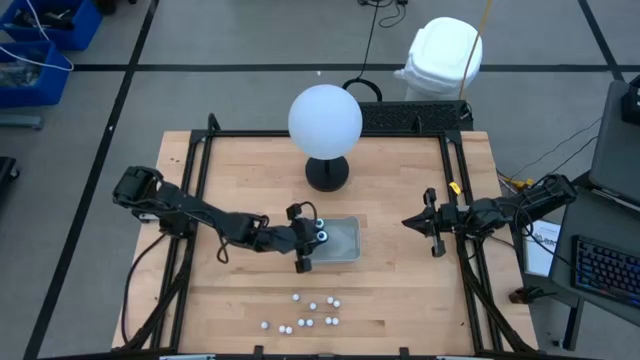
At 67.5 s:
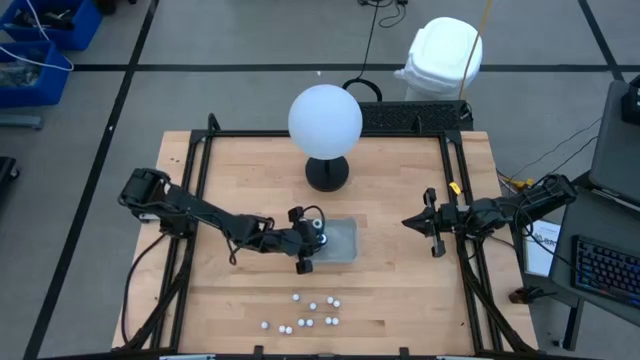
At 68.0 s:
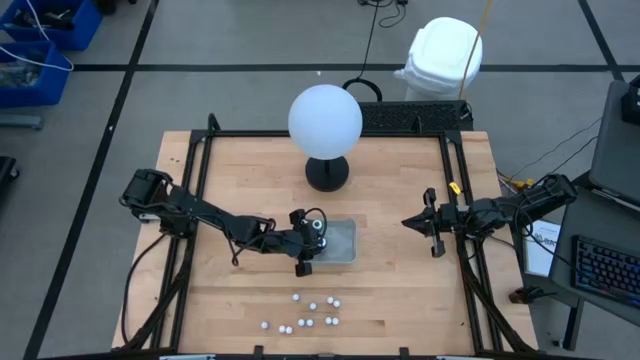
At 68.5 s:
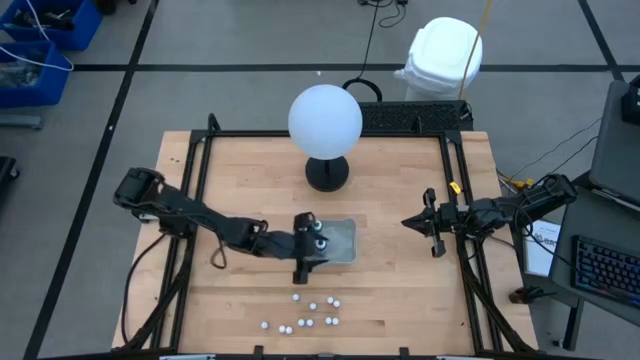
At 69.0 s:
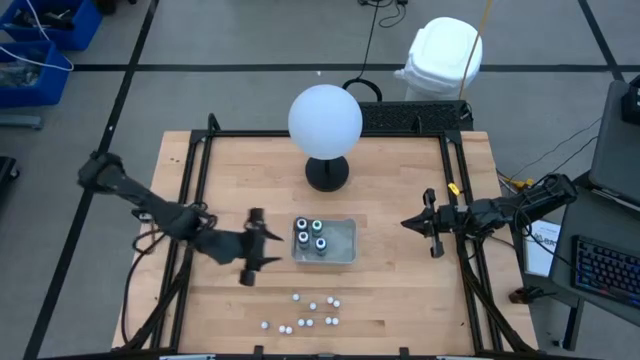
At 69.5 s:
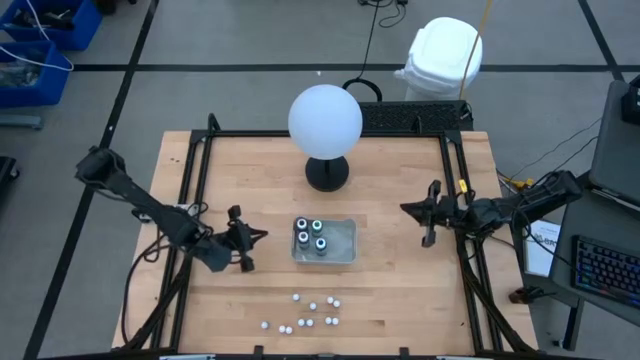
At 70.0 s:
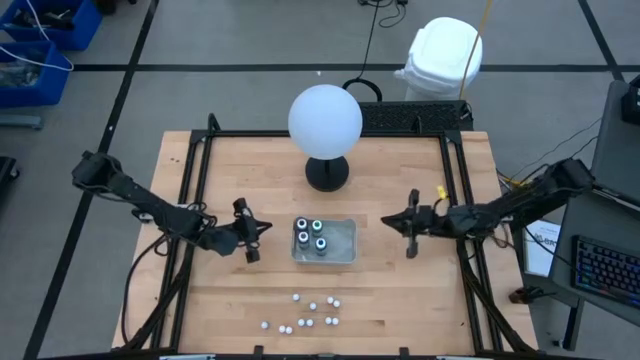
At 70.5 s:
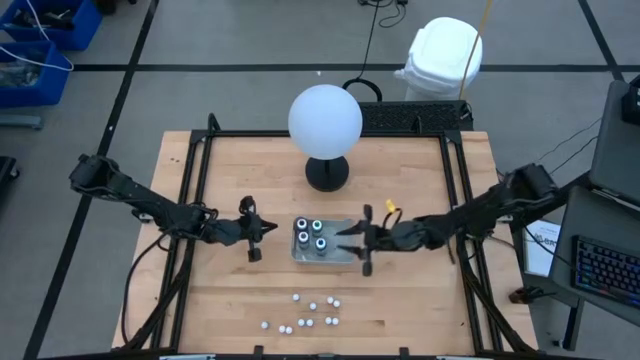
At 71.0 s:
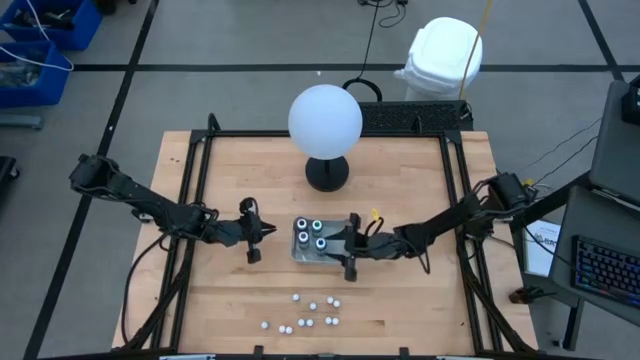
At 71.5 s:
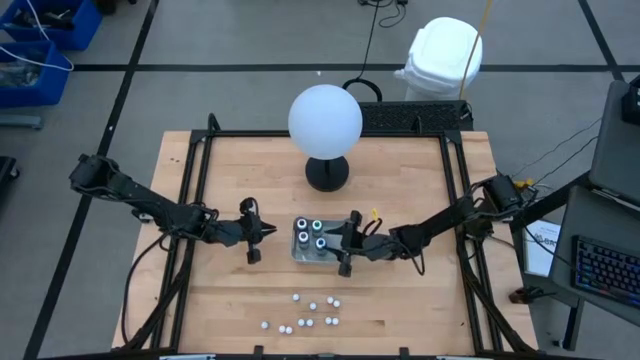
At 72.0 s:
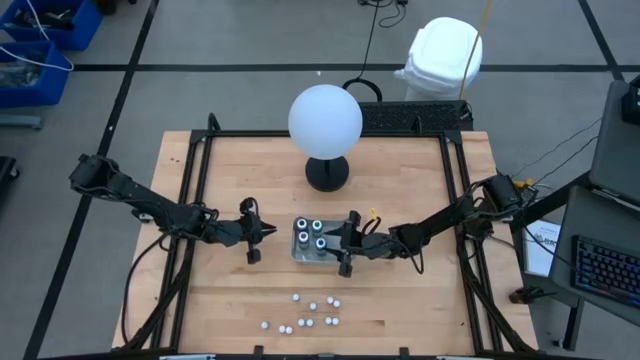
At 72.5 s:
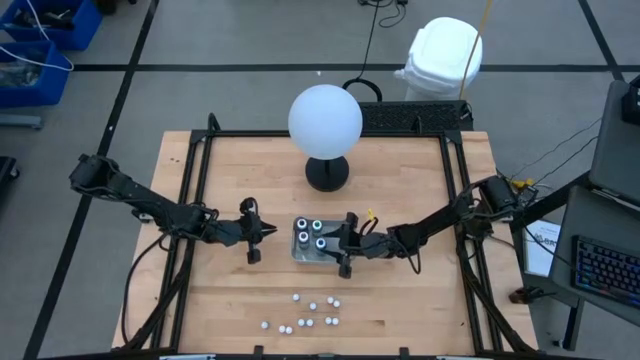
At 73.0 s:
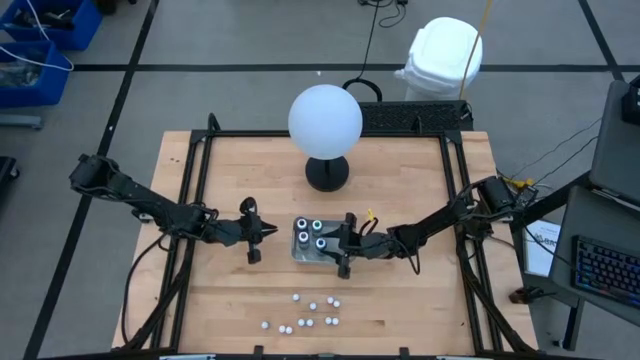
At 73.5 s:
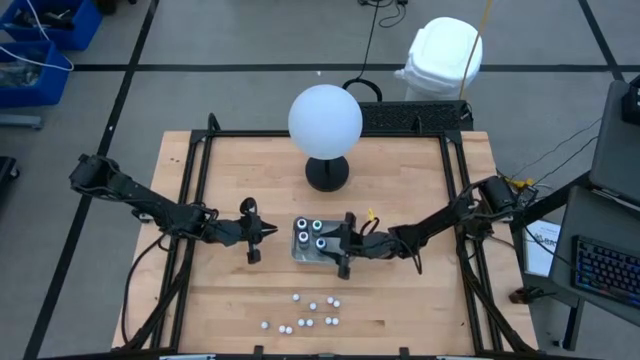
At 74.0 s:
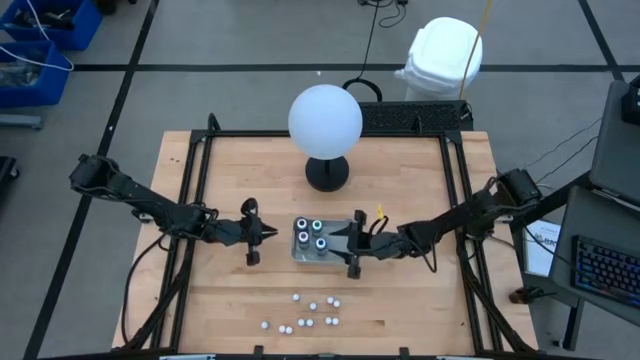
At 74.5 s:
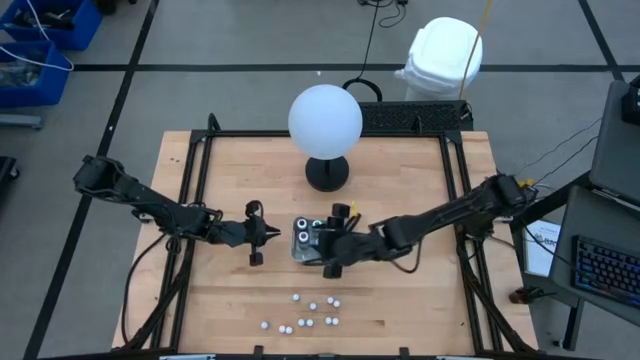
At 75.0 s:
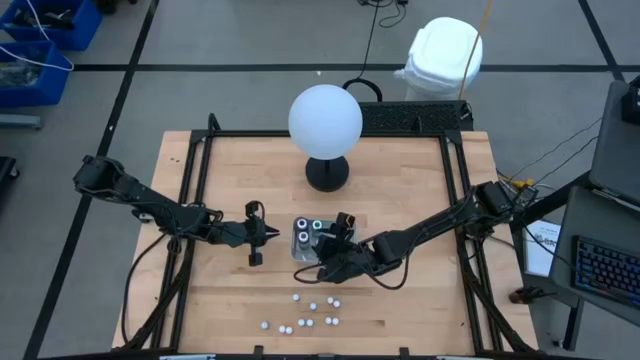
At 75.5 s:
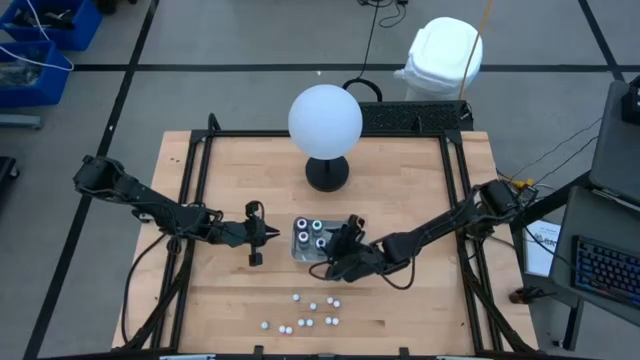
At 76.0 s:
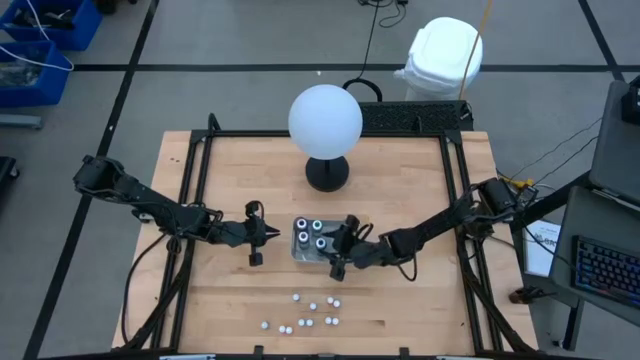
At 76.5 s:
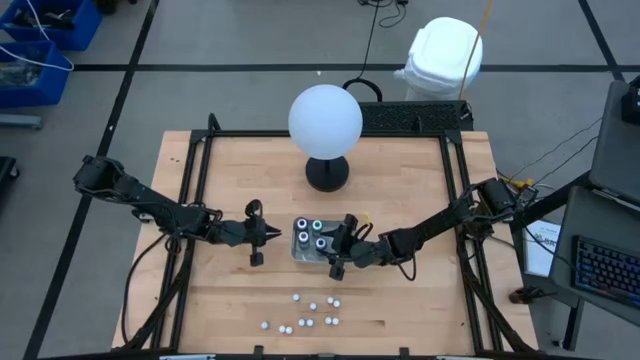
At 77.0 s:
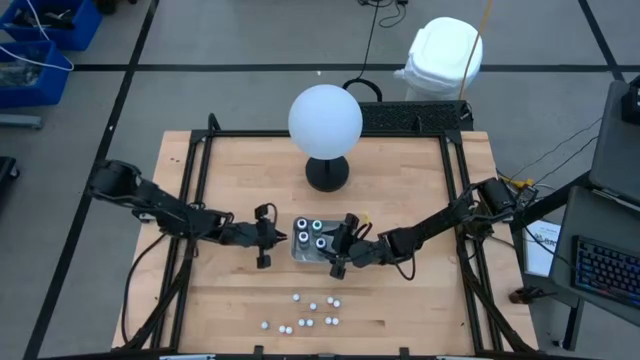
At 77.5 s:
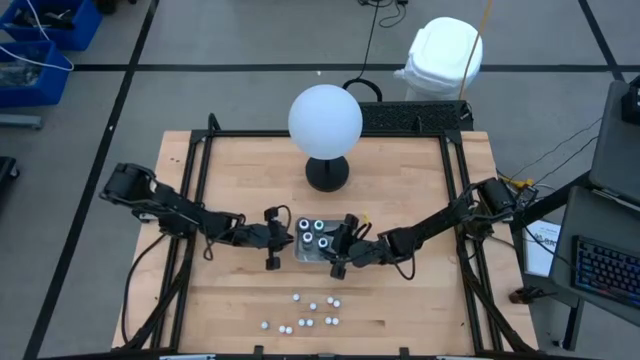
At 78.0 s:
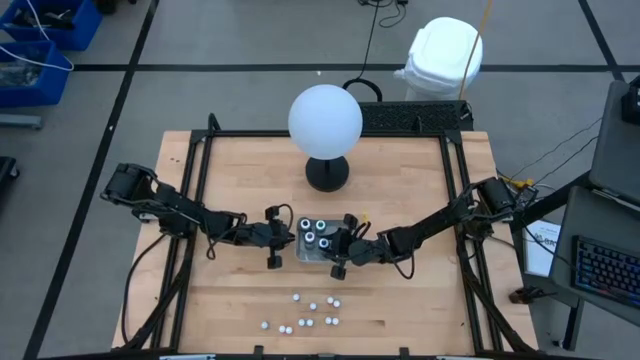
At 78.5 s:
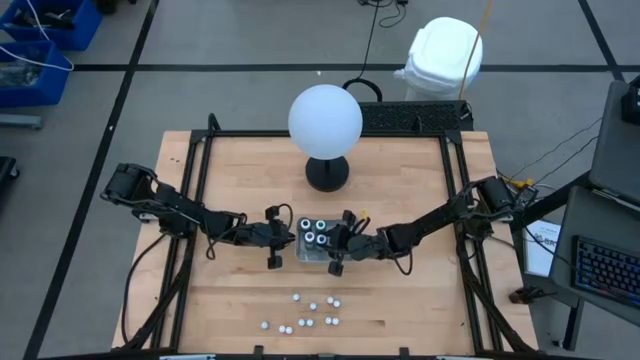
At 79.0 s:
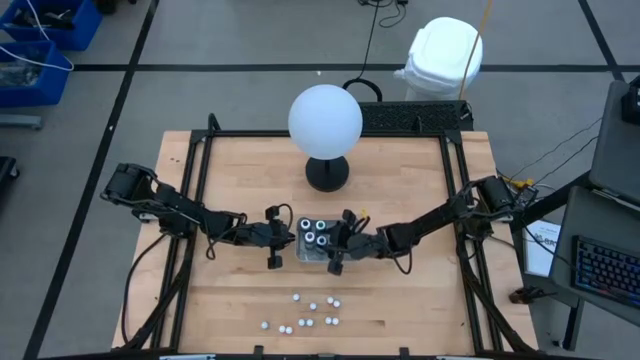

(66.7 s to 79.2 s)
Task: Pick & Place food coloring
Put the large blue food coloring bottle into the gray bin

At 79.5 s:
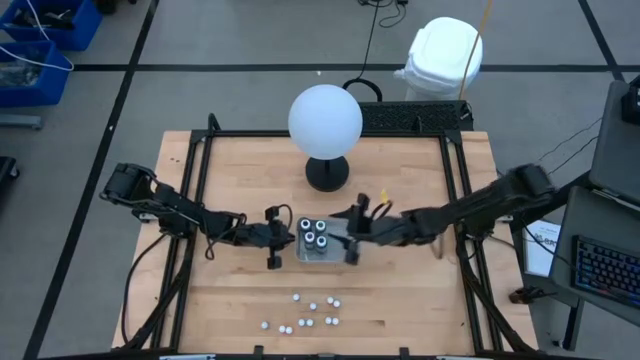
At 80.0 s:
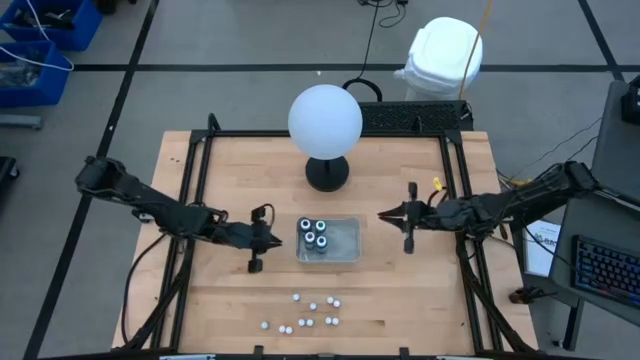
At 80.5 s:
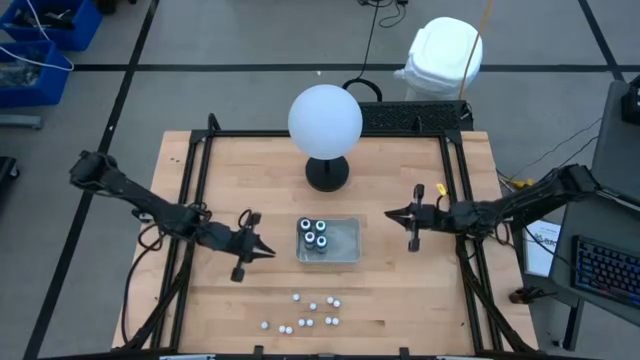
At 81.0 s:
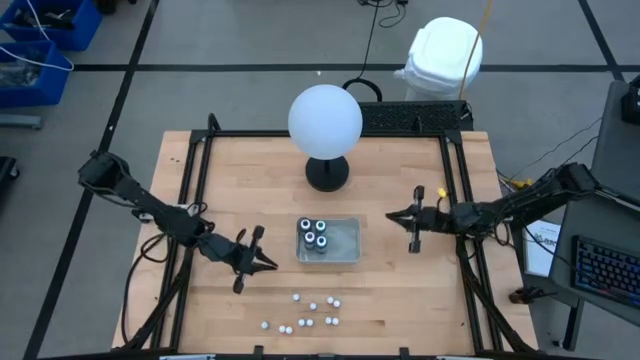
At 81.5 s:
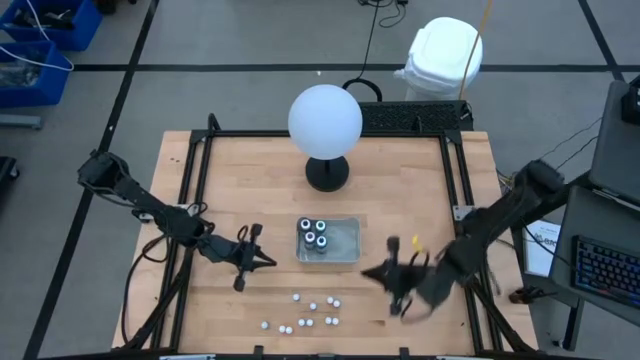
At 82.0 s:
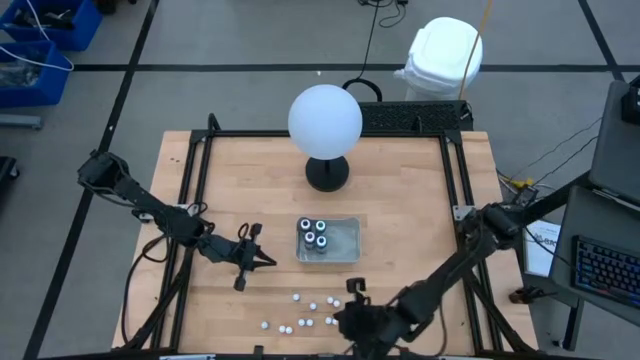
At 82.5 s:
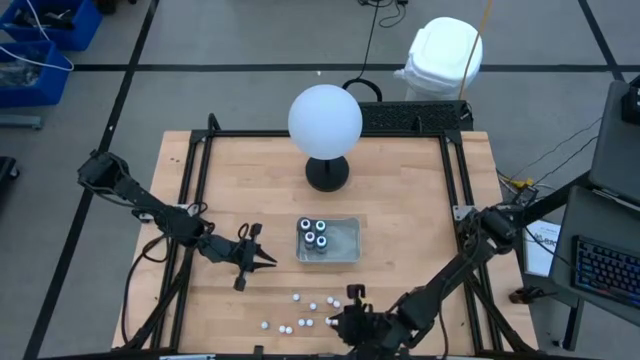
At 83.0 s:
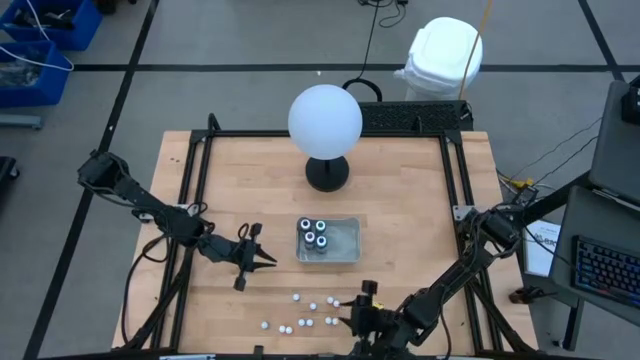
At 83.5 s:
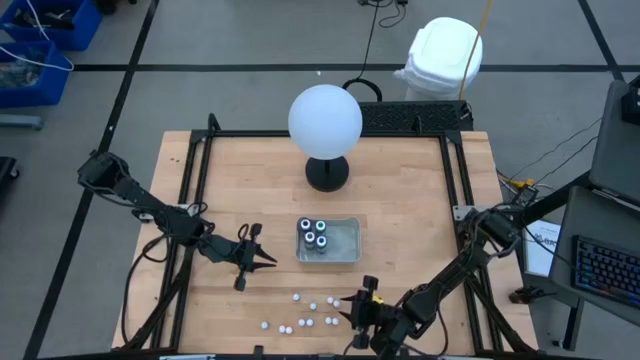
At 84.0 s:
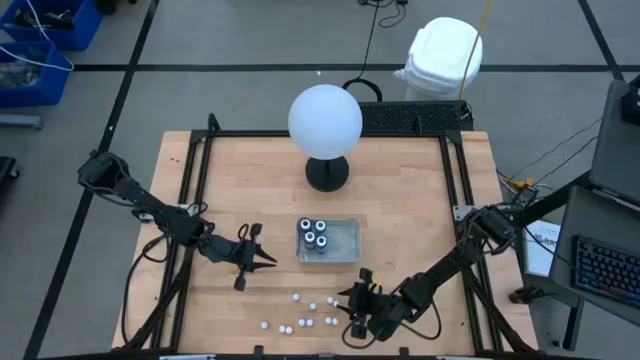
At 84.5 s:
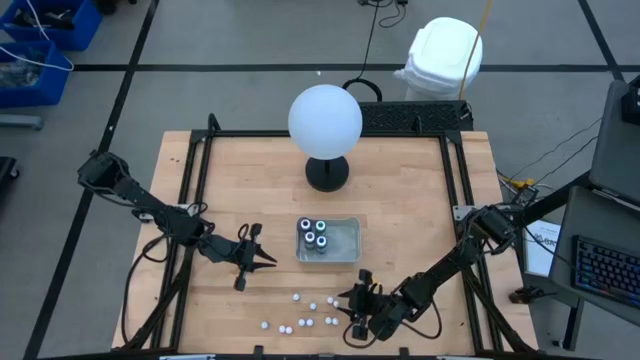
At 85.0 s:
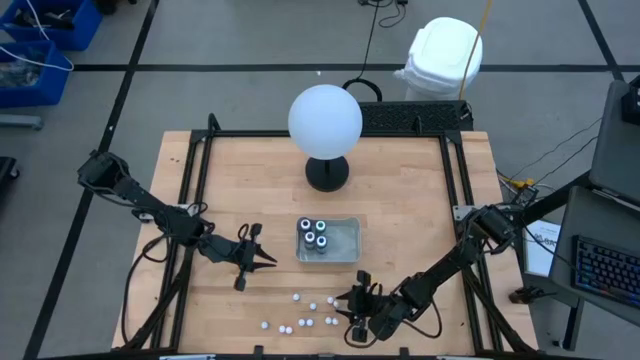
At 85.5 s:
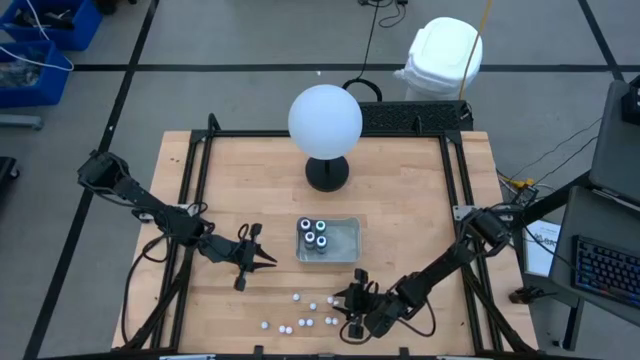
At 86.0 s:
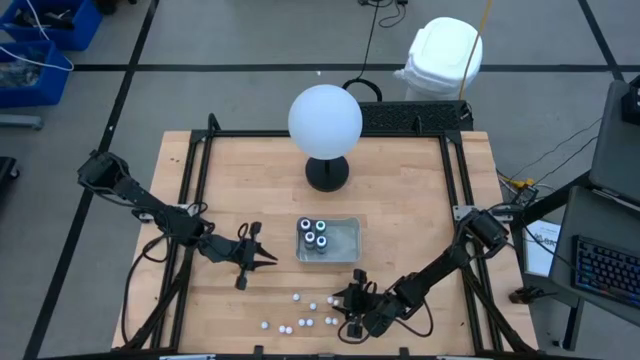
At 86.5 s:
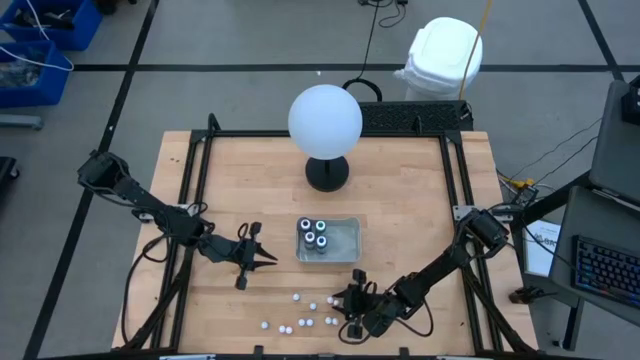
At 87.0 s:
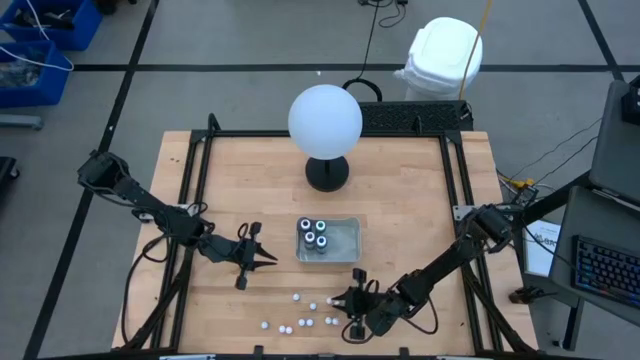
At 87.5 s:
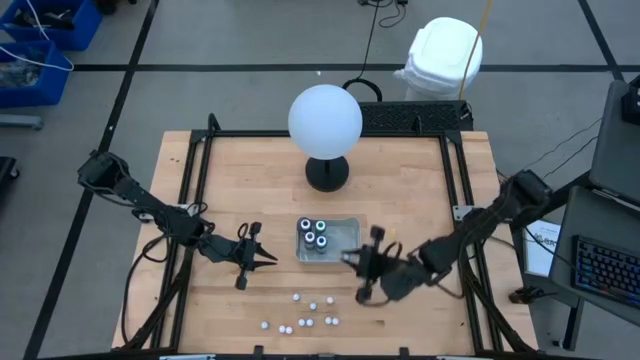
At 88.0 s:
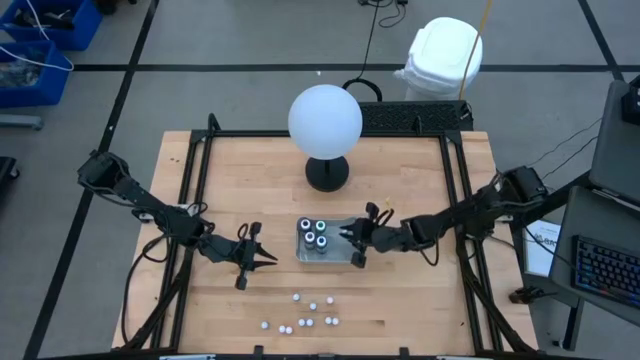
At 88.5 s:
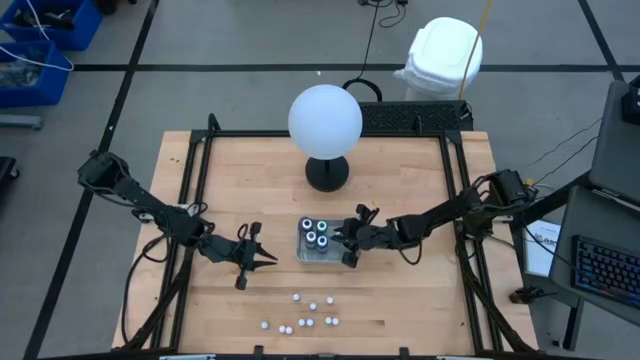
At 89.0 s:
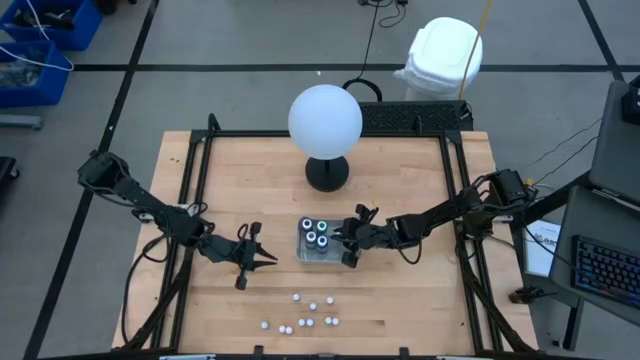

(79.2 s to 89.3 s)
Put the small black food coloring bottle into the gray bin
